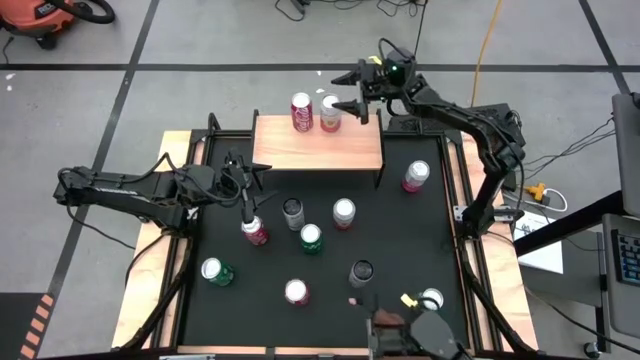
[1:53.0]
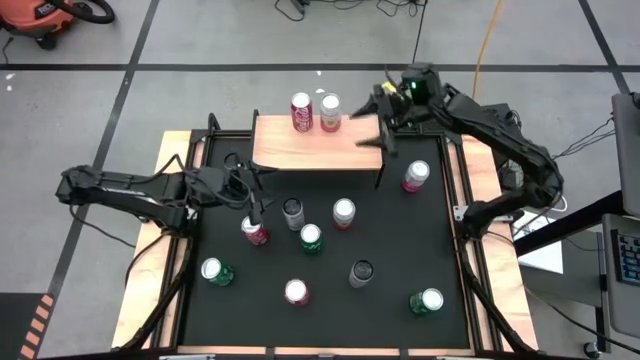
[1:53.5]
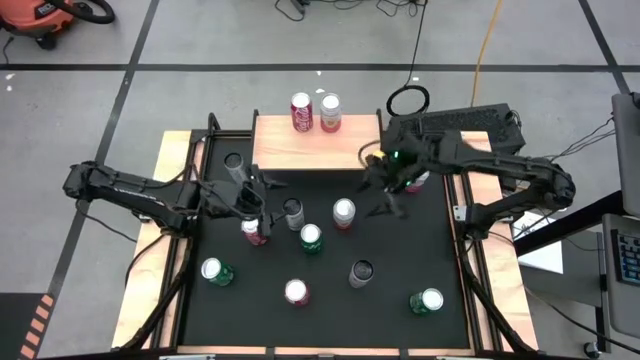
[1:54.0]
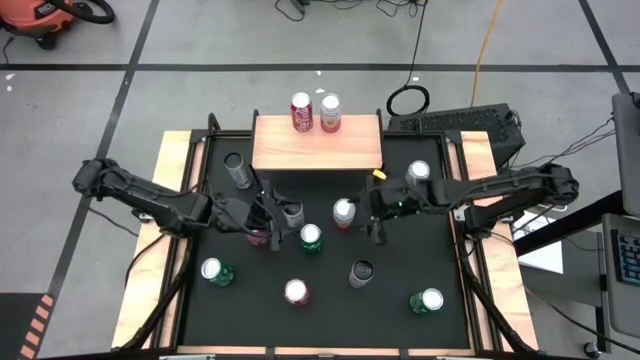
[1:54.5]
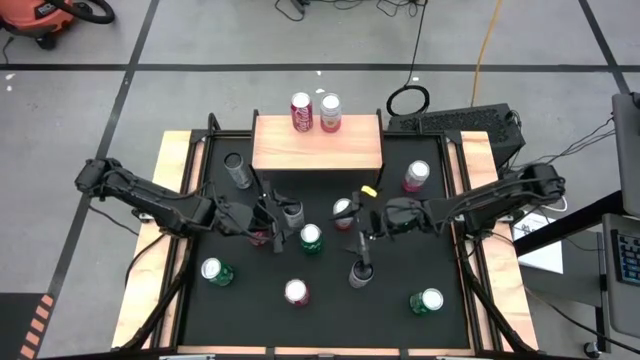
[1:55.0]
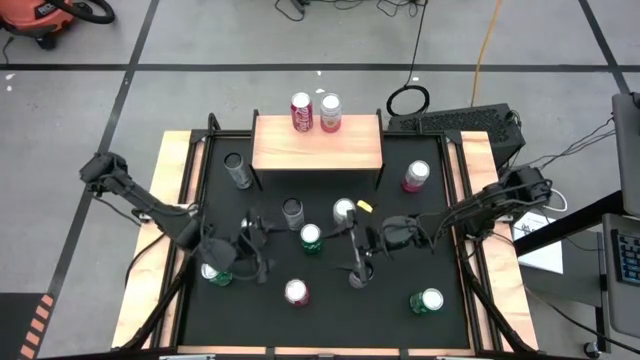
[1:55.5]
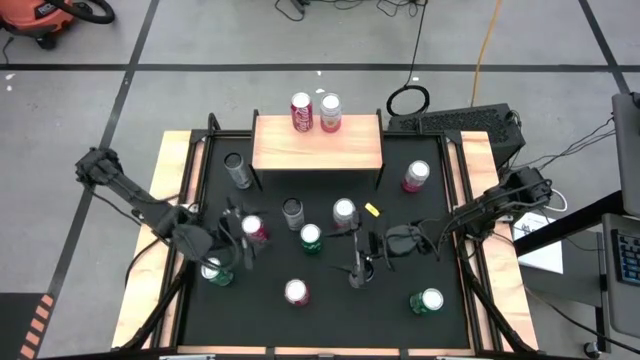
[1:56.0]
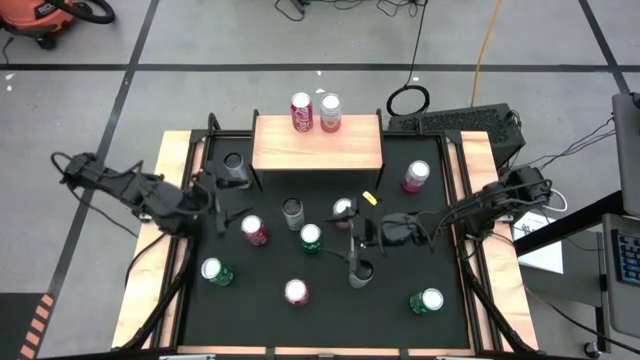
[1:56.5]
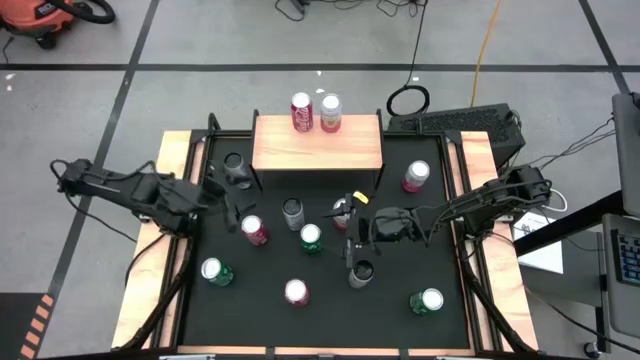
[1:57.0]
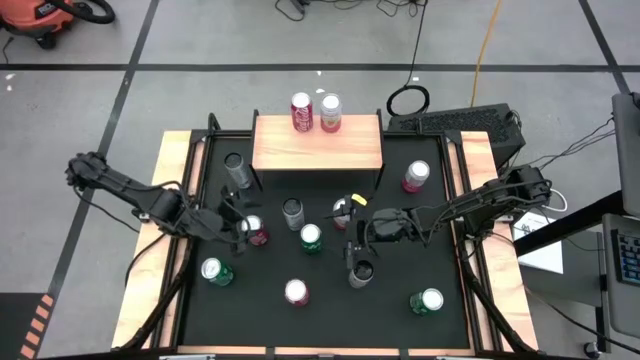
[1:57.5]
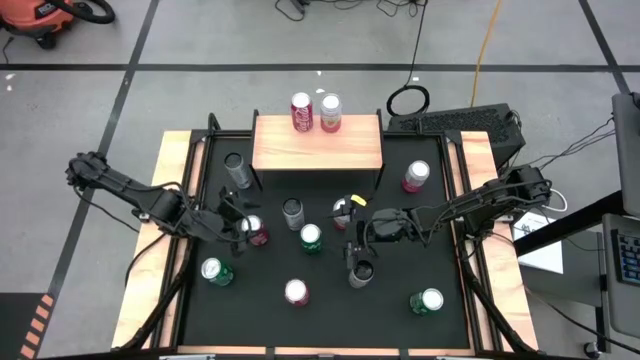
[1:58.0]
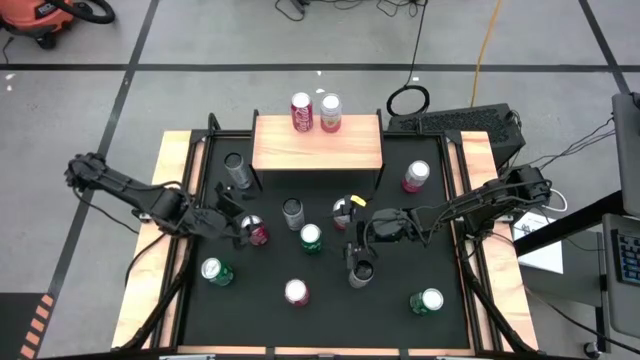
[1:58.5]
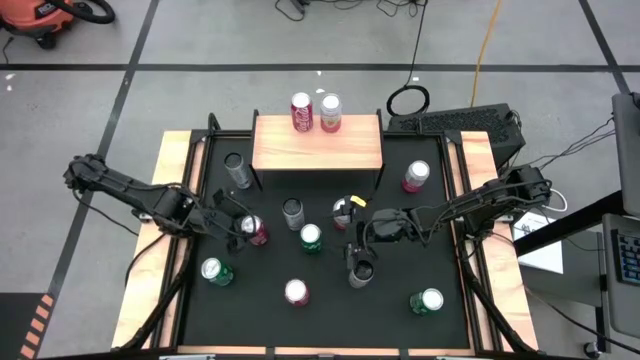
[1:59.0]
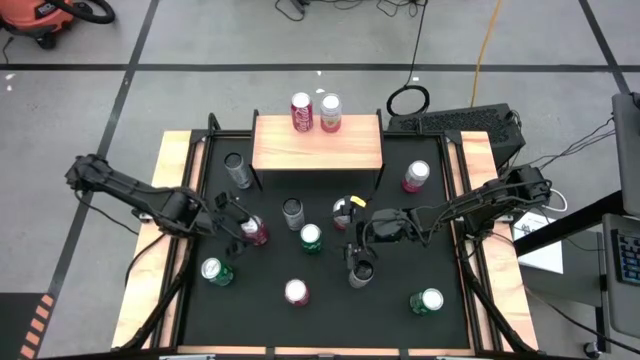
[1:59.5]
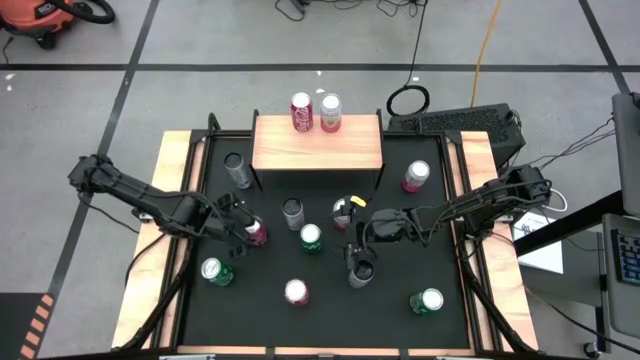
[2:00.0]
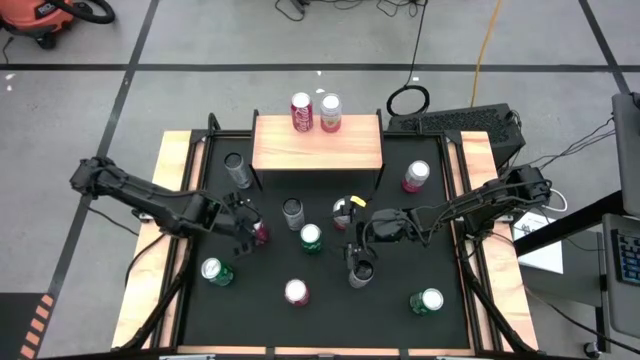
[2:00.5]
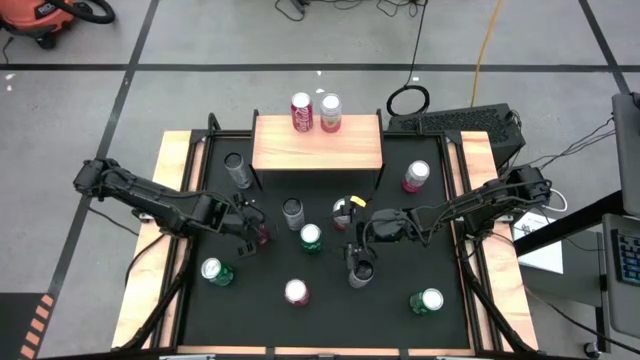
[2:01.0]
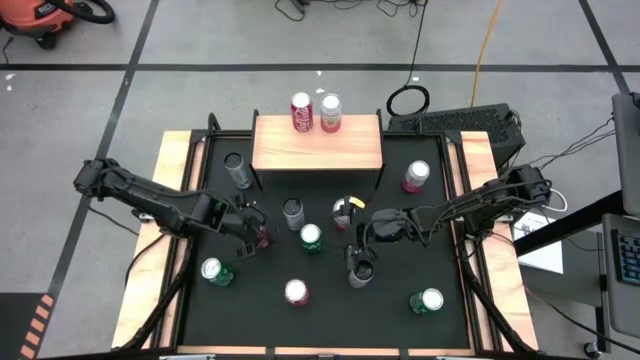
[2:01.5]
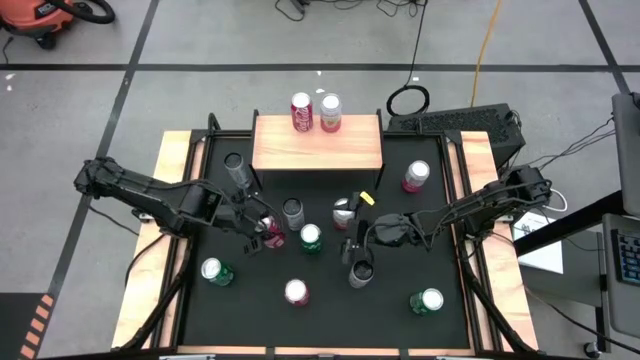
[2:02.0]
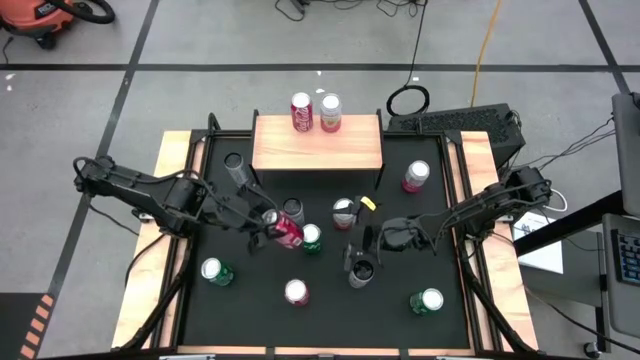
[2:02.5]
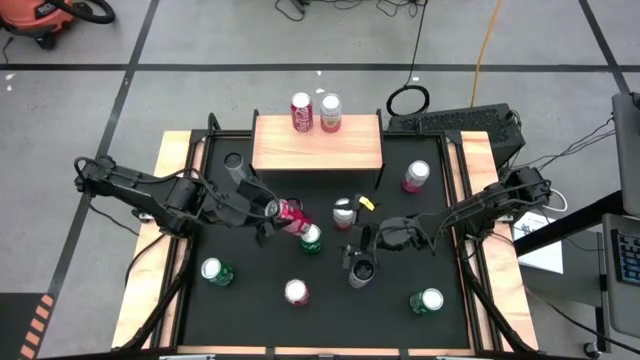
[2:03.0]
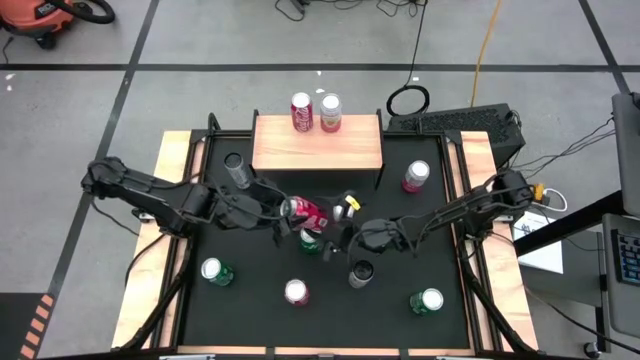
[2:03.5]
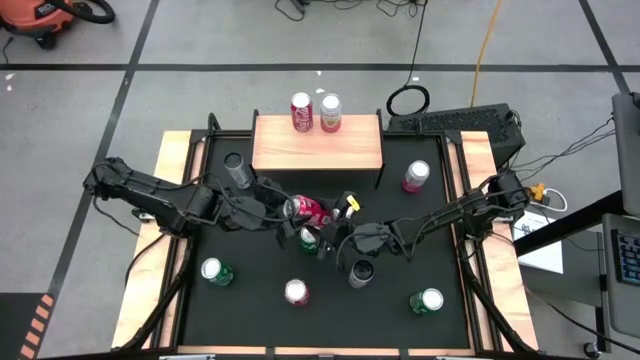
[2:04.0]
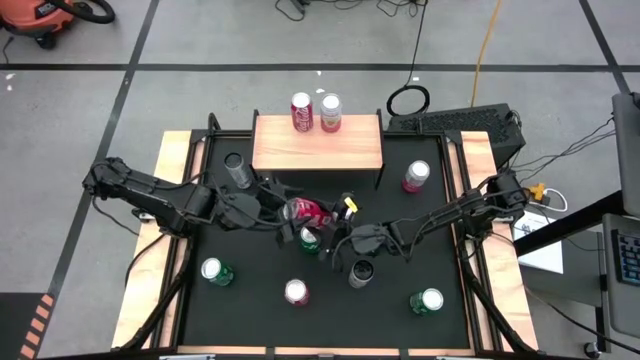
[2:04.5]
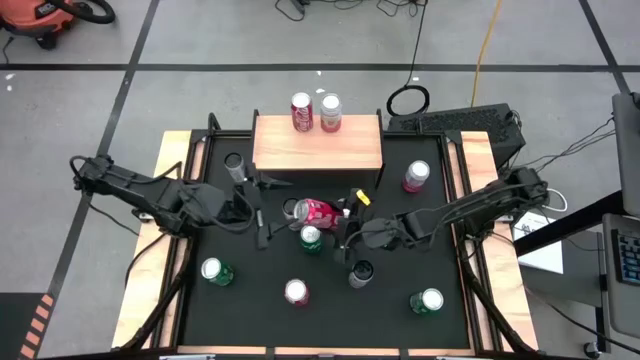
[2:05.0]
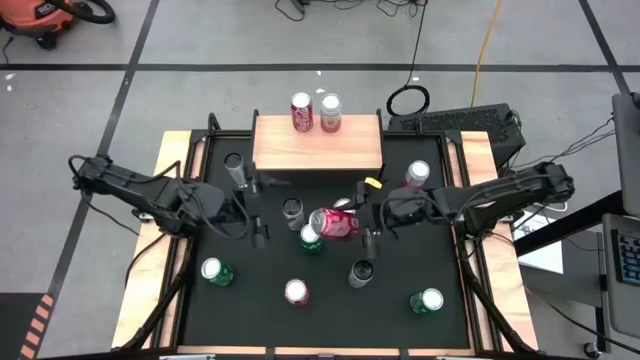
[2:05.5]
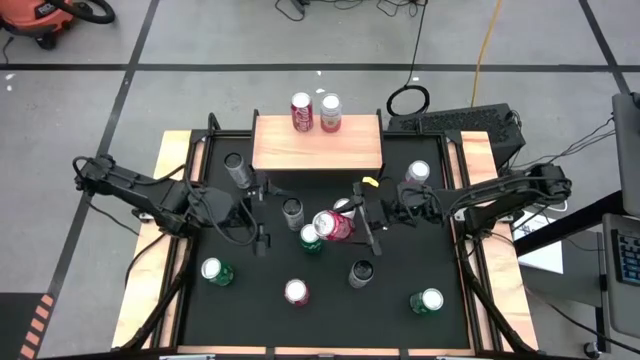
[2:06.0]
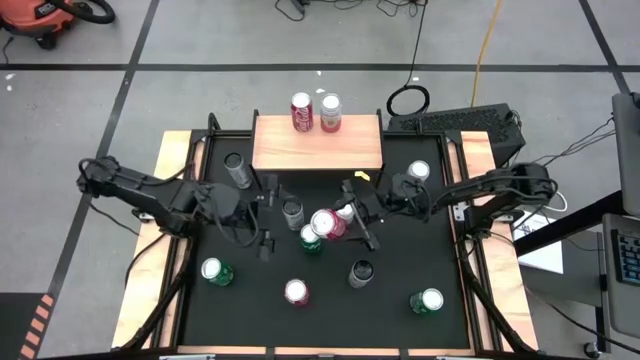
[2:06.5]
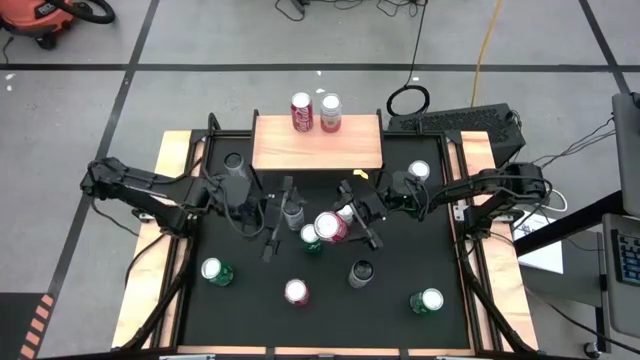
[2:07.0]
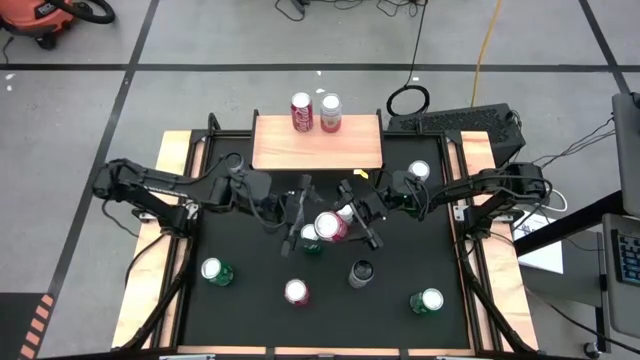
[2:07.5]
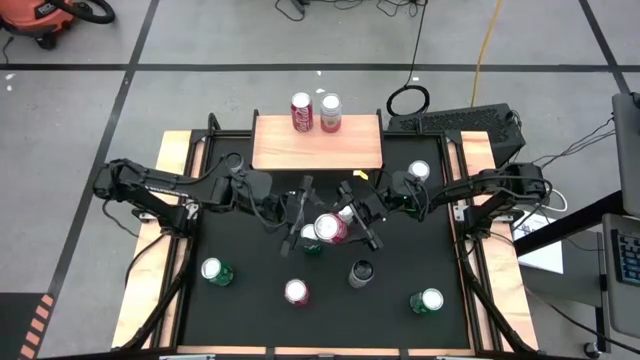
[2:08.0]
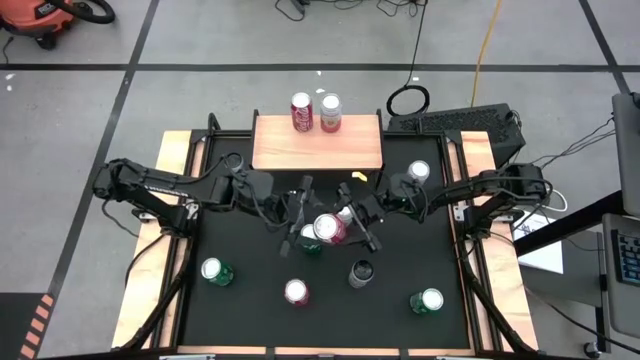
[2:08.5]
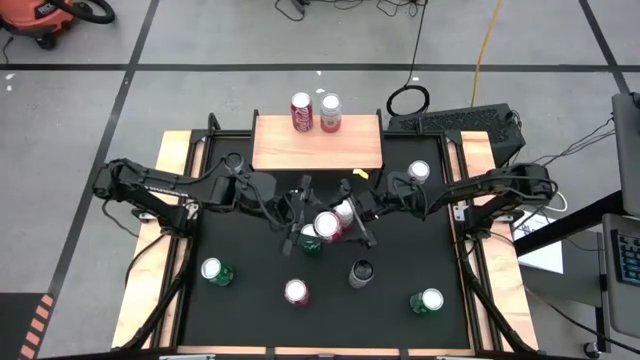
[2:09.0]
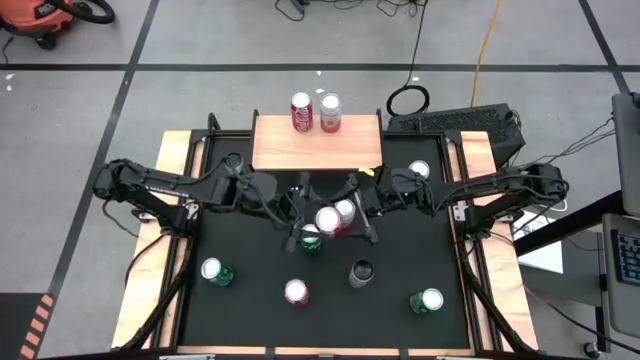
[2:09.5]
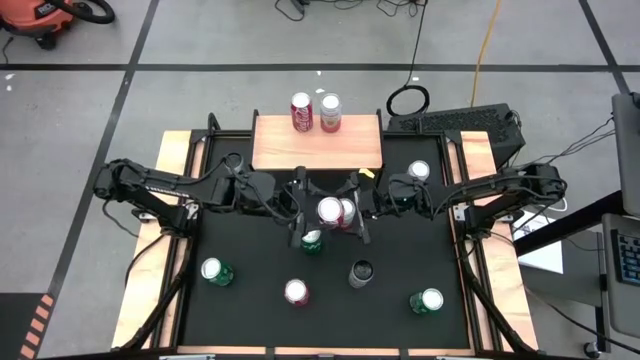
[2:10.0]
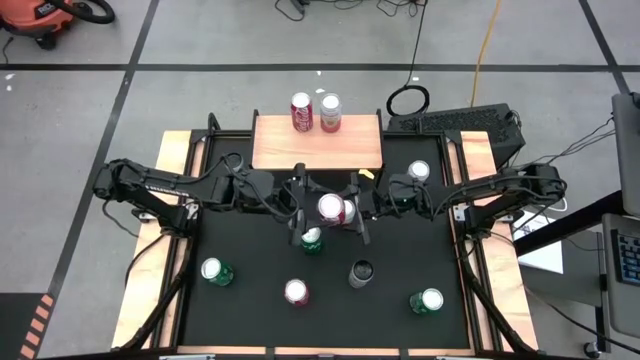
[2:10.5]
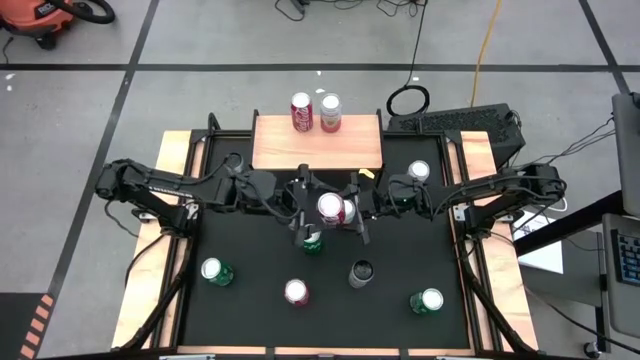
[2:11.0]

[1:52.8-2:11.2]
Task: Place canned beverage on shelf
Put the top red soda can on the shelf aligned with the other red soda can

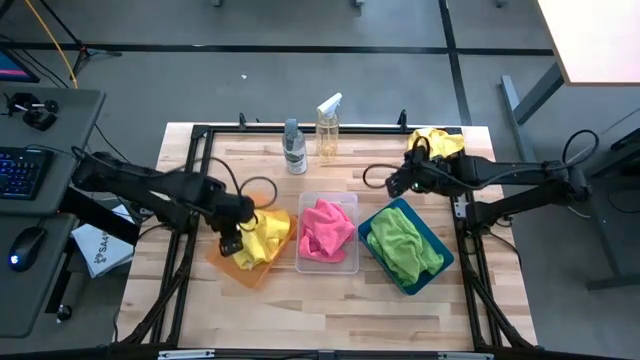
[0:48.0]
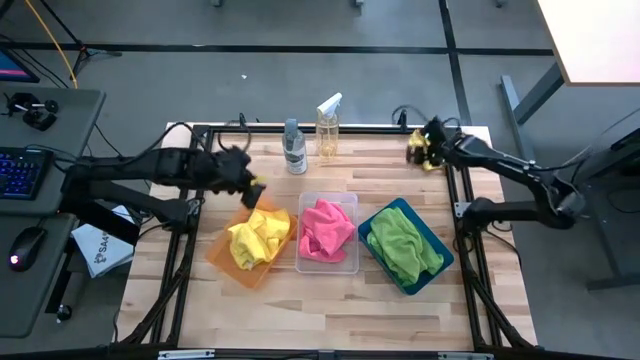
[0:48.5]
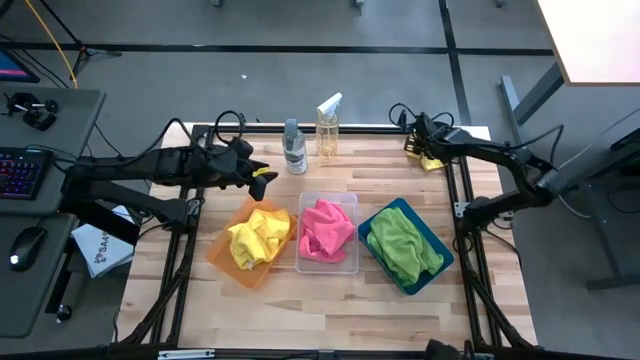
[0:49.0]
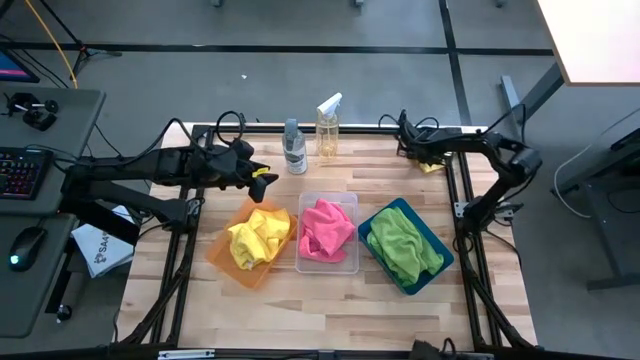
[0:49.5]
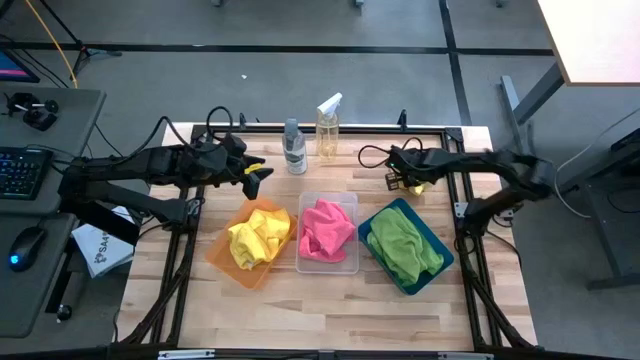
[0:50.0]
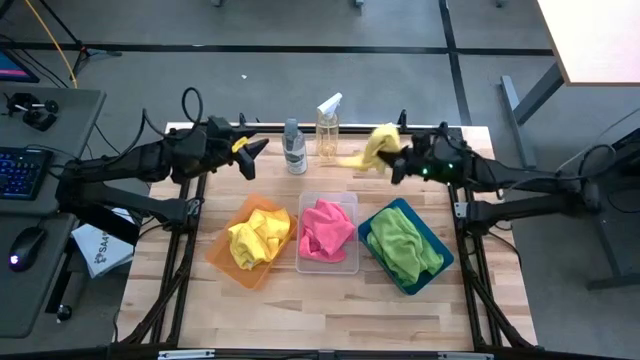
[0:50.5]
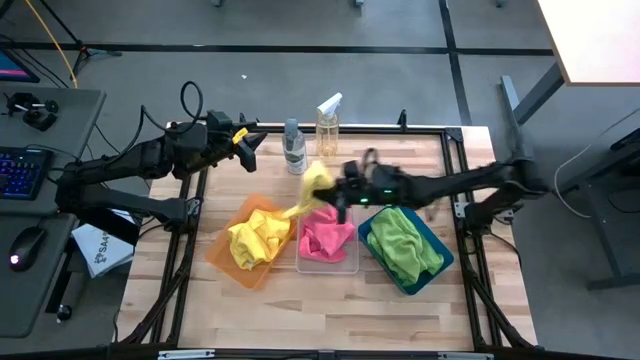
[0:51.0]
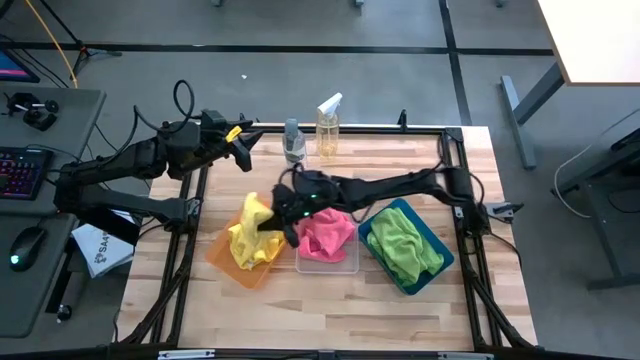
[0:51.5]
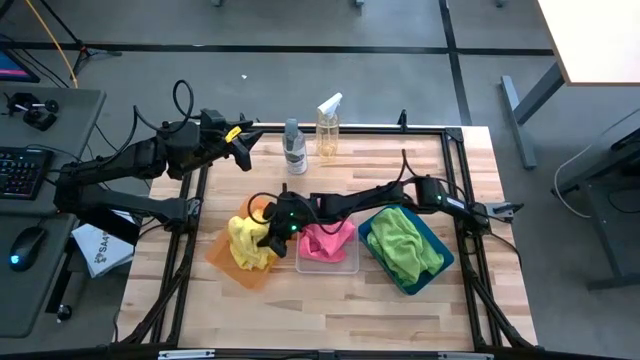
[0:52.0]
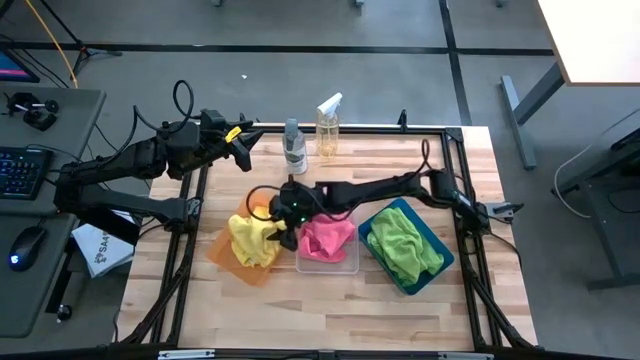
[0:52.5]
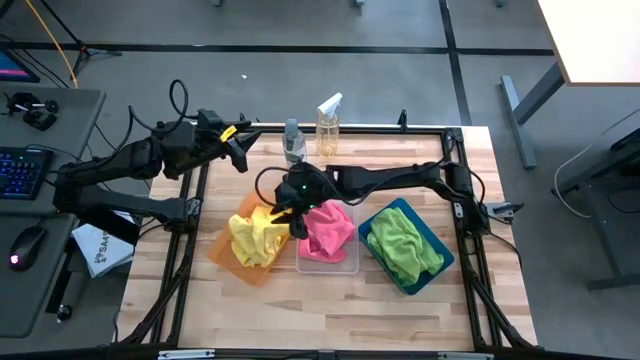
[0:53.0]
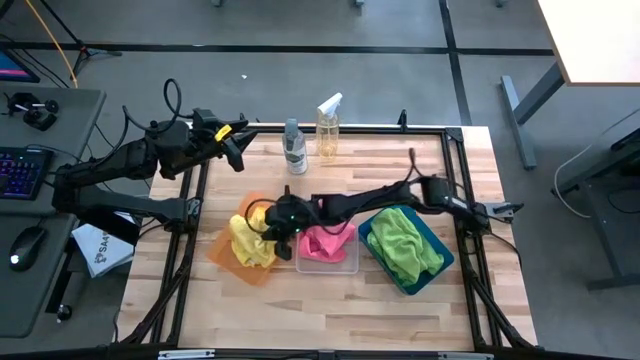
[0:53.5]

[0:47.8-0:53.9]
Task: Sort microfiber towel by color & place in baskets
Put the yellow microfiber towel into the orange bin
